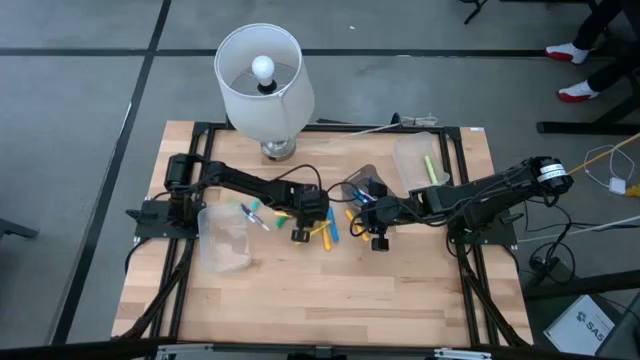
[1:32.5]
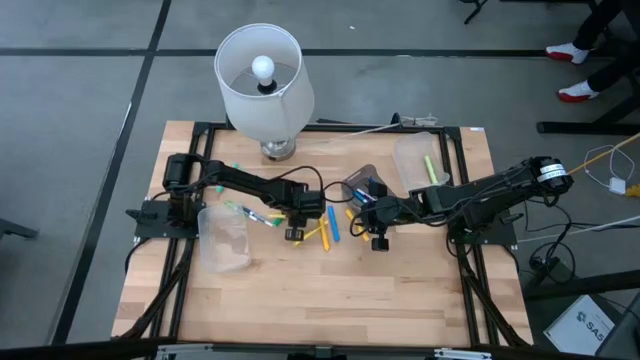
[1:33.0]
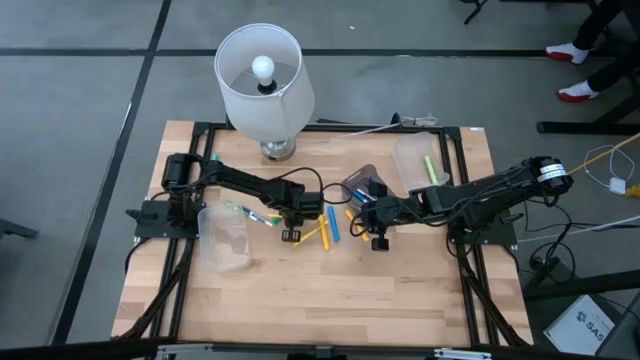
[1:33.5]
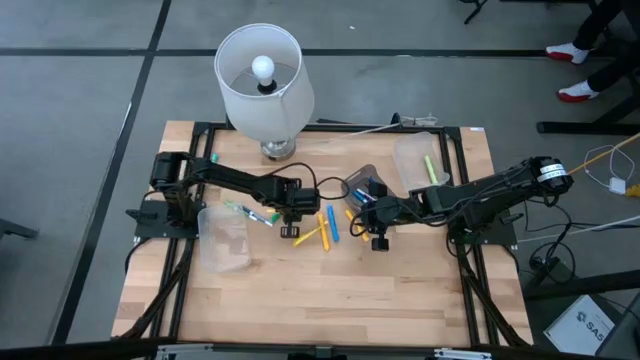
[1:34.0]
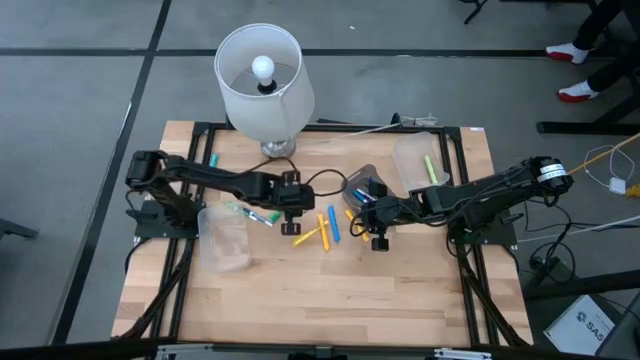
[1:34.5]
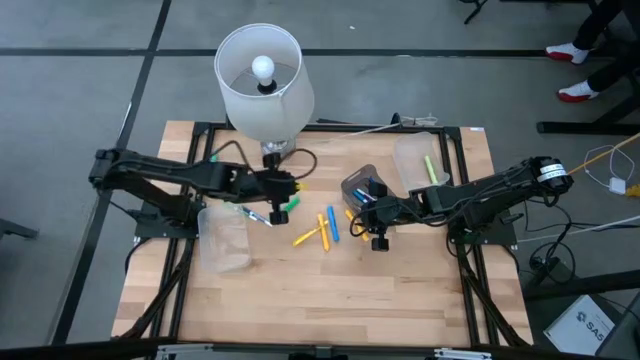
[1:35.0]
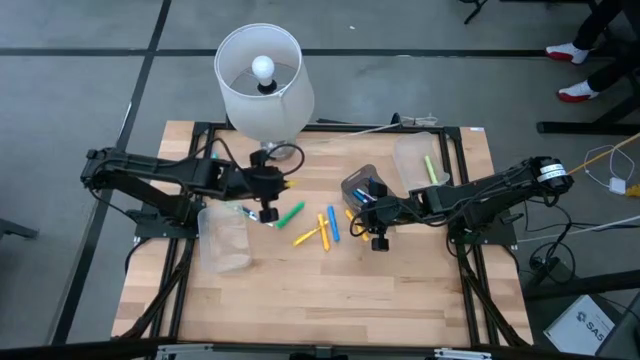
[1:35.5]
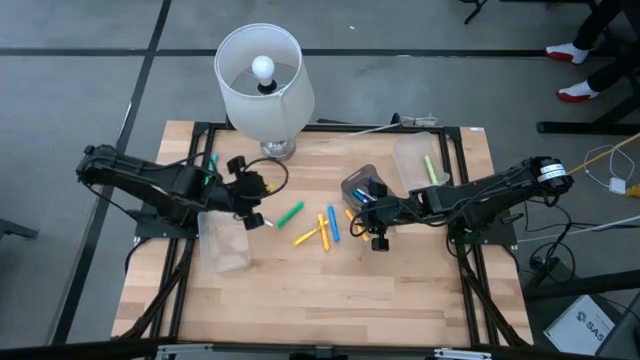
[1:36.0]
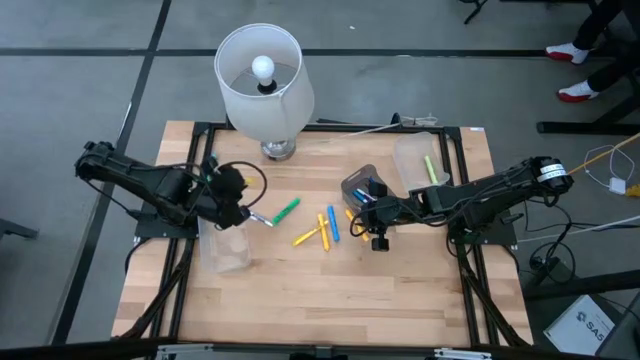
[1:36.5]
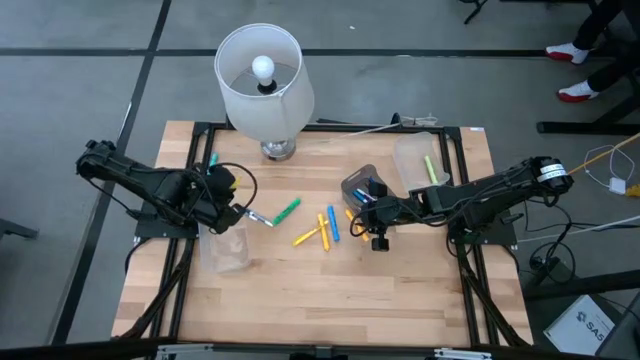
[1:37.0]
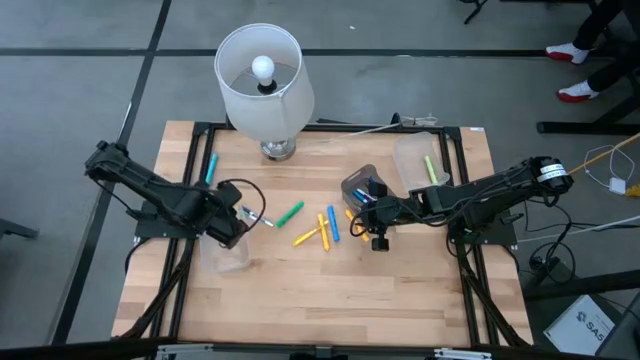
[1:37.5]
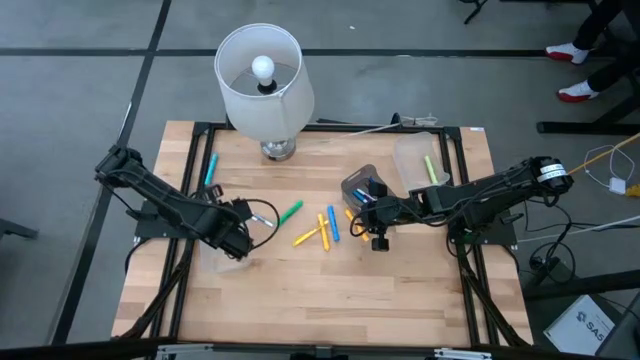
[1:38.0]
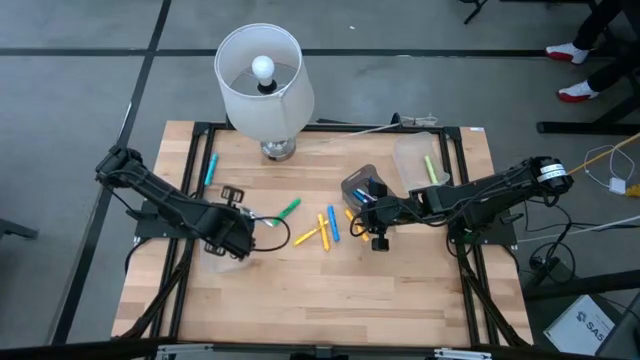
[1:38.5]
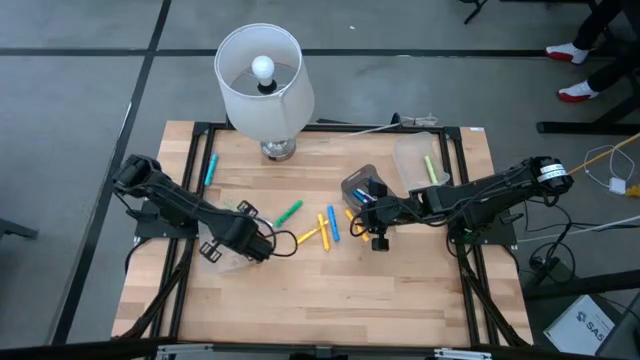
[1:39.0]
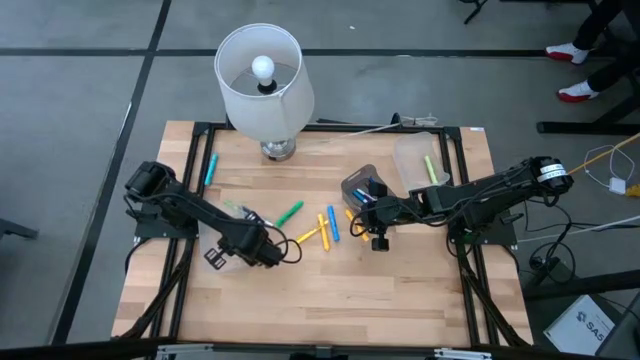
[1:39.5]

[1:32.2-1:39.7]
Task: Pick & Place Markers
Put the yellow pen into the left transparent bin

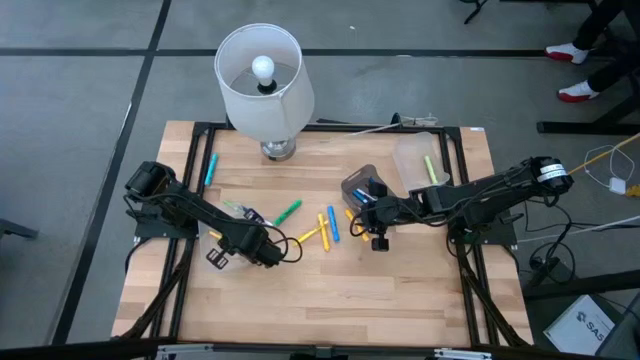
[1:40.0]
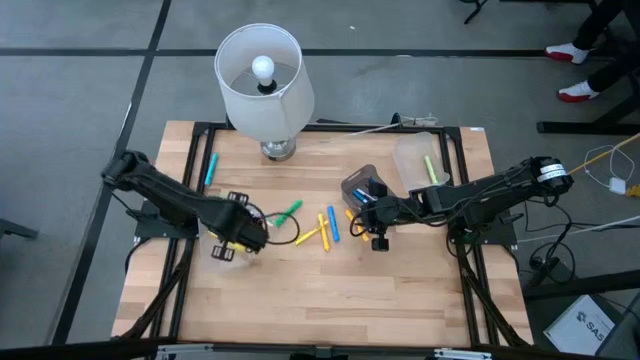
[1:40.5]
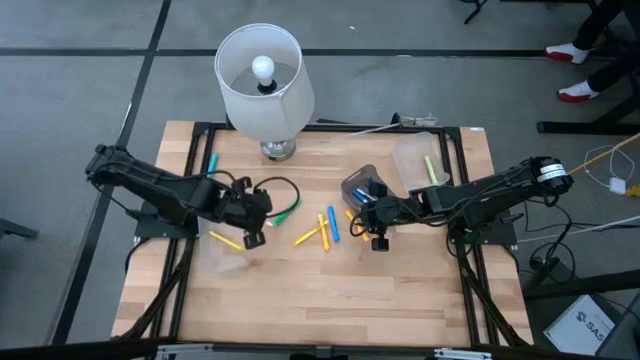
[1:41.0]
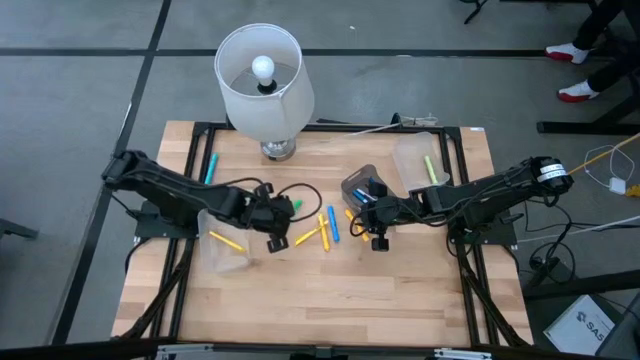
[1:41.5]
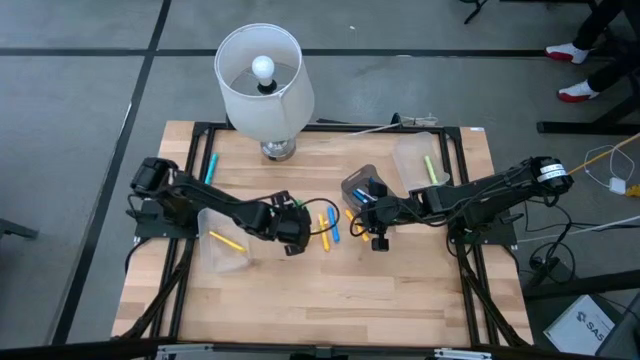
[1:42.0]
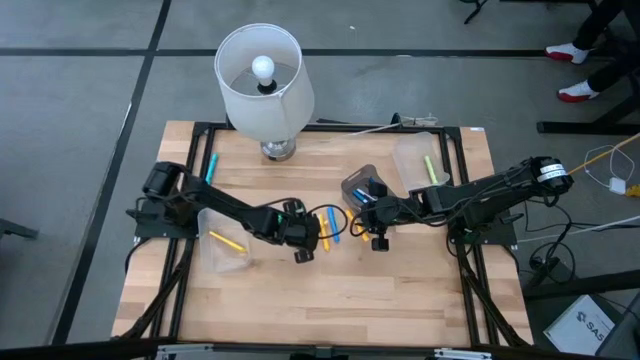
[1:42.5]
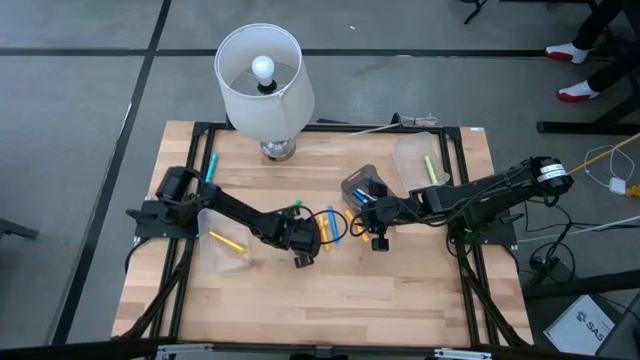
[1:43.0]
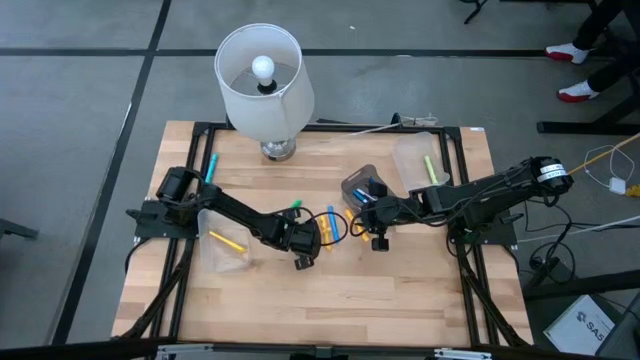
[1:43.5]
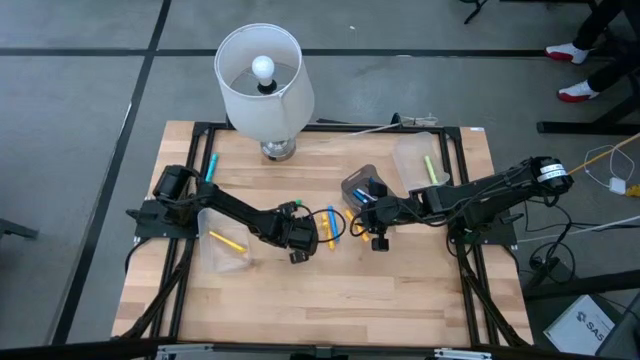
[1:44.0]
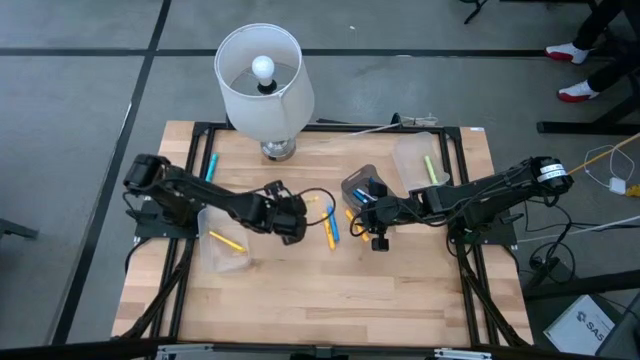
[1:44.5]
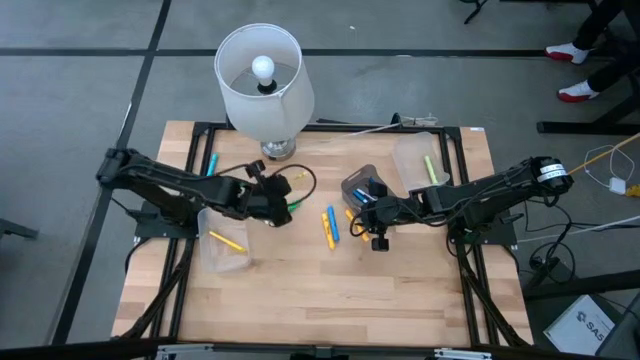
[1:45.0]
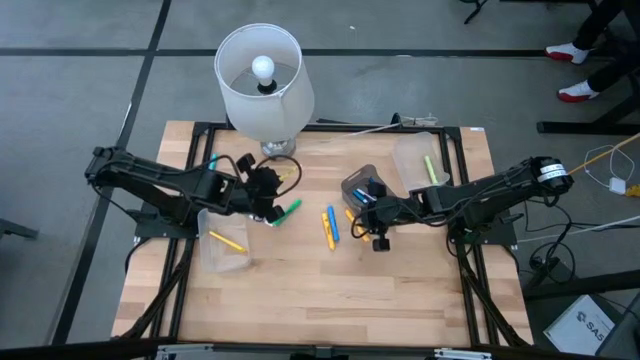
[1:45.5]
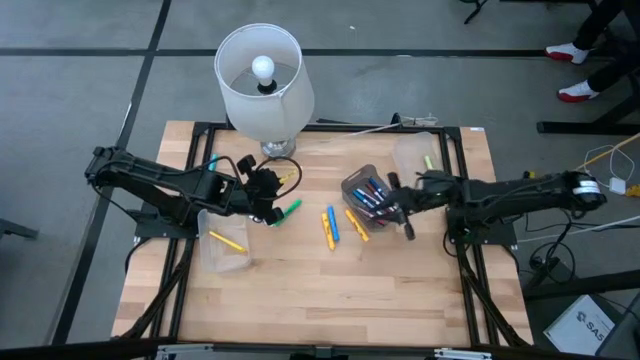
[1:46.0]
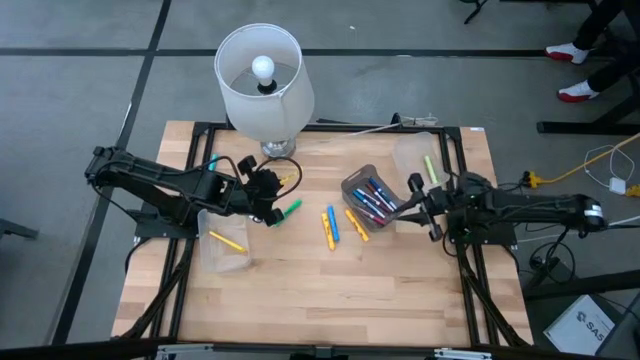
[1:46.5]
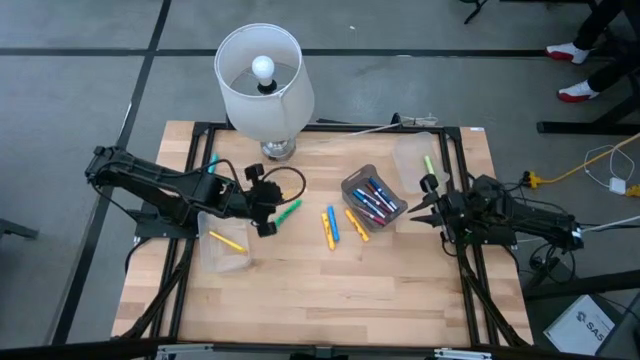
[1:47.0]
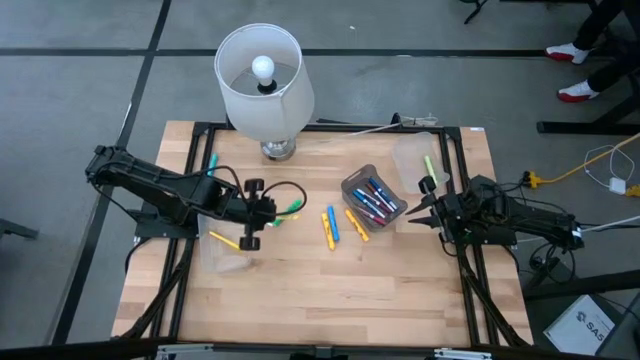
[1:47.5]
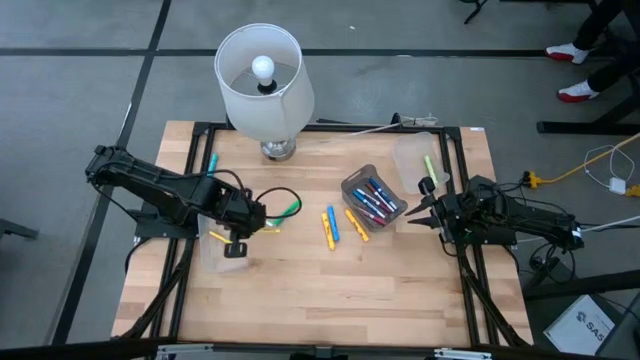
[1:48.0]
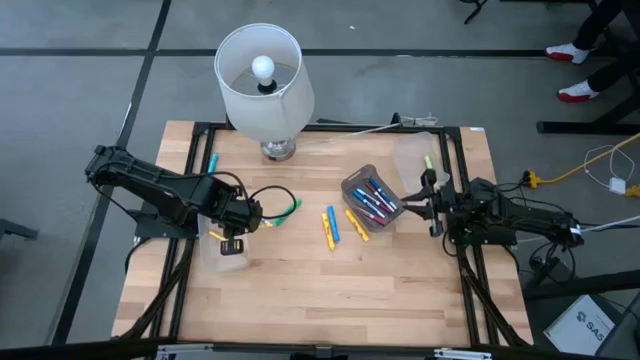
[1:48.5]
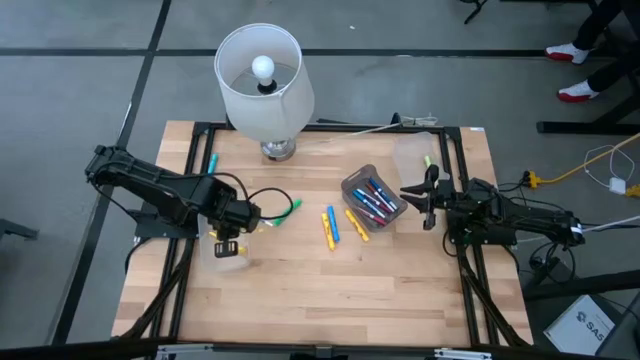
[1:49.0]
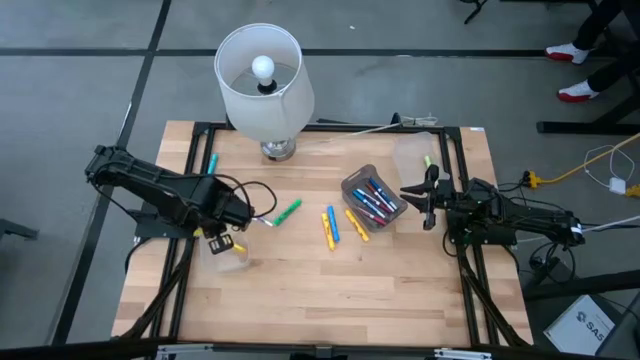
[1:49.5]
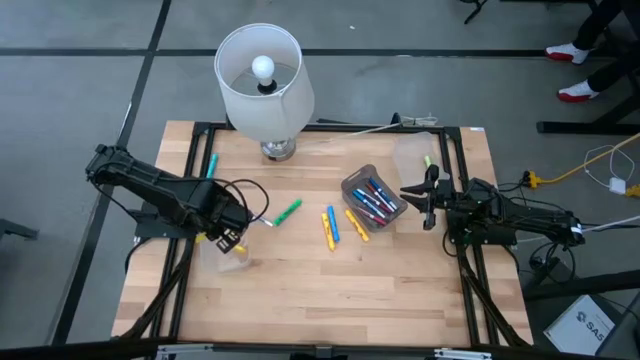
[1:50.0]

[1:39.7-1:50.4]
Put the yellow pen into the left transparent bin

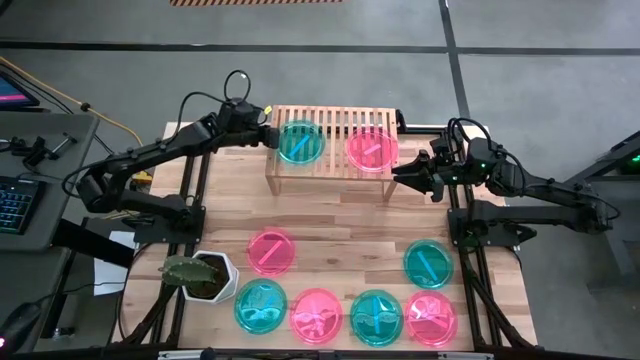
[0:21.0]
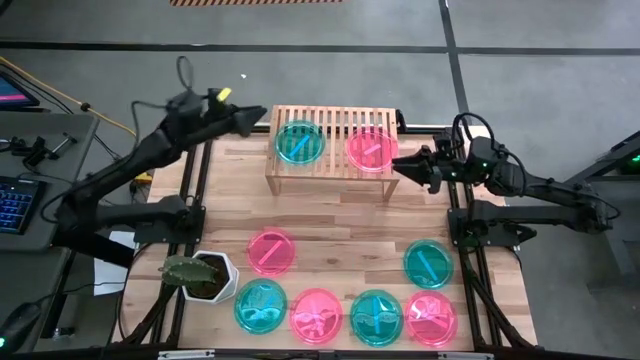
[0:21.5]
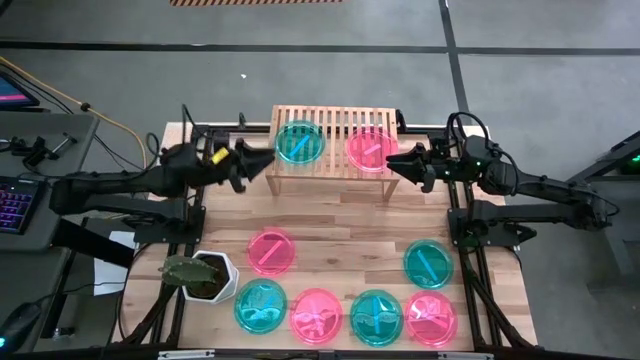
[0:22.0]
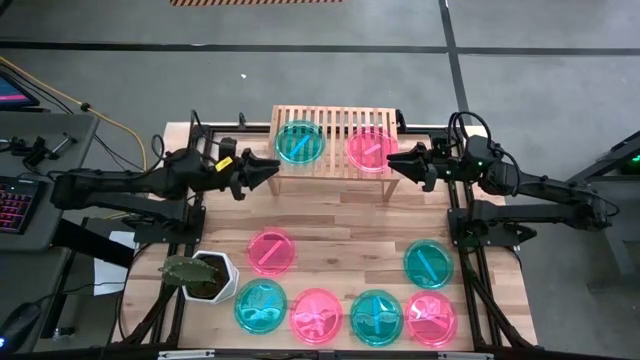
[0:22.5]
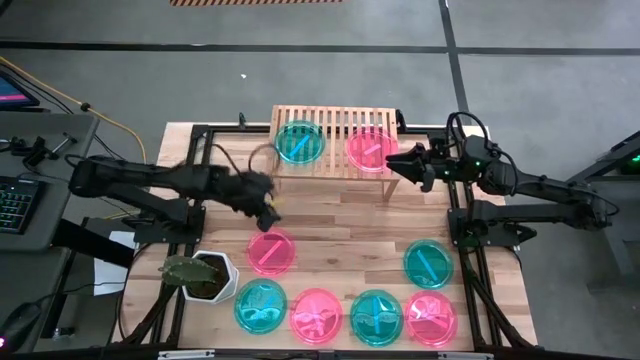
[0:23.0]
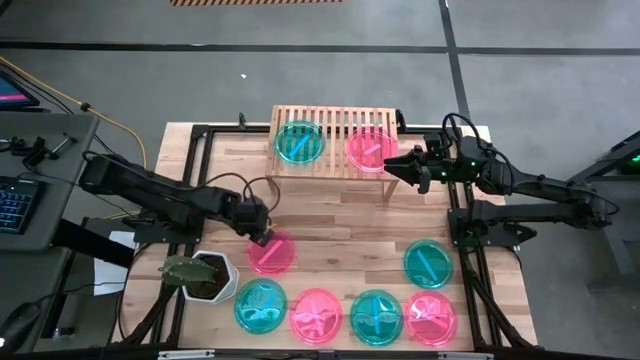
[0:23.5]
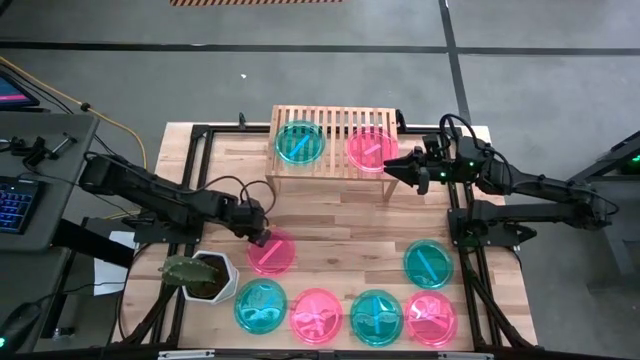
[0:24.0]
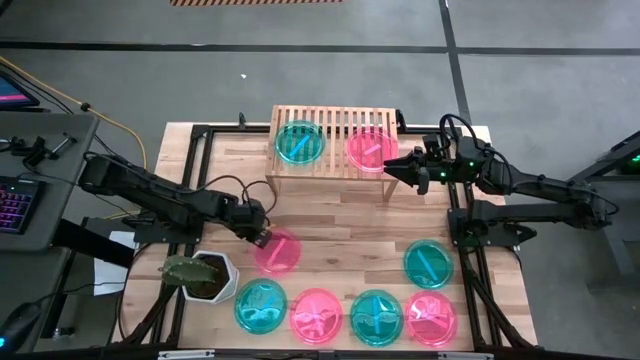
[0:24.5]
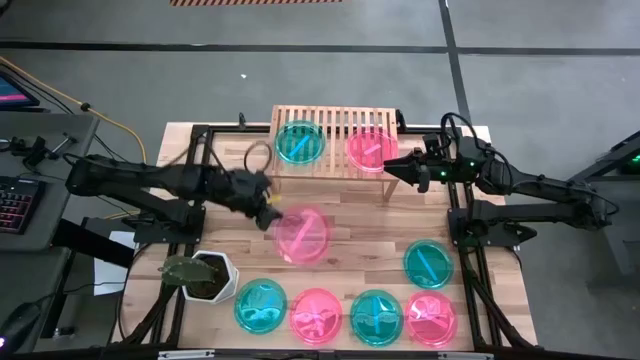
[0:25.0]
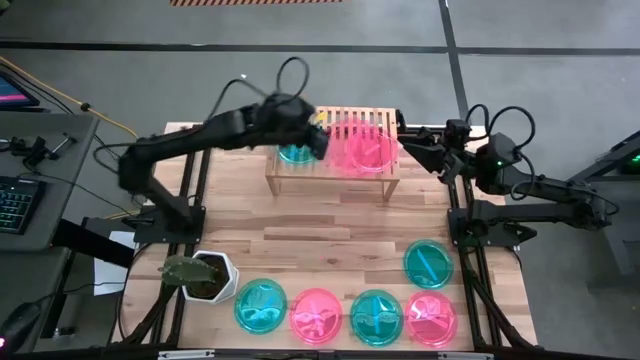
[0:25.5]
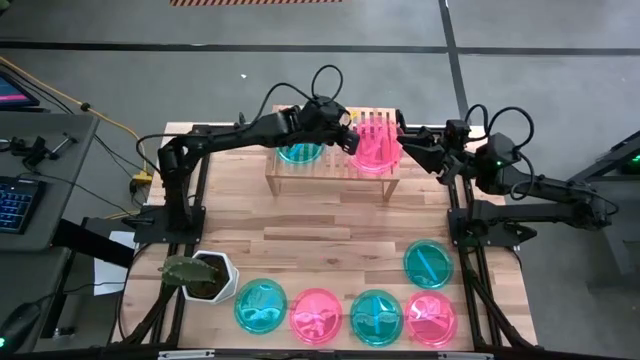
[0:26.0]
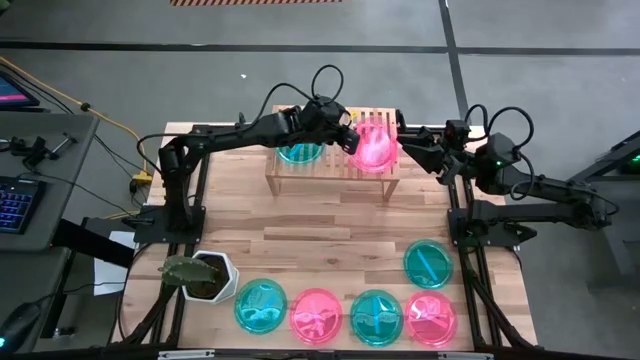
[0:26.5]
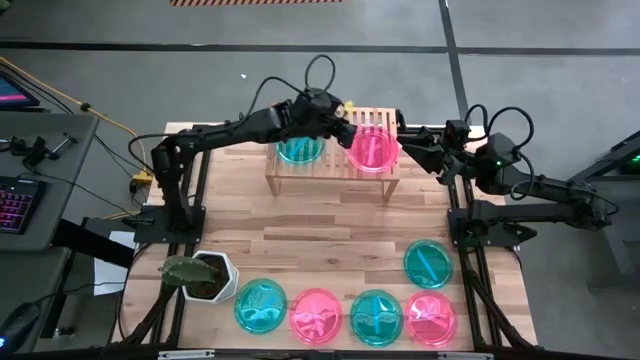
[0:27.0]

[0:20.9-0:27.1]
Task: Place and stack plates onto a shelf
Stack the top pink plate on the pink plate
